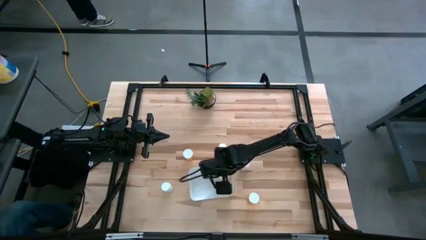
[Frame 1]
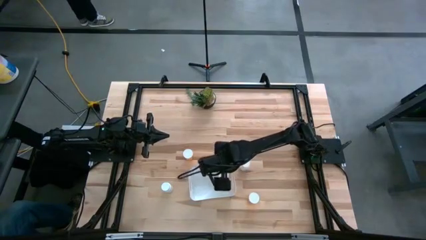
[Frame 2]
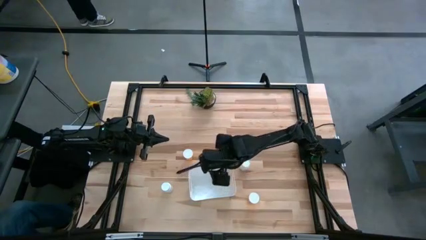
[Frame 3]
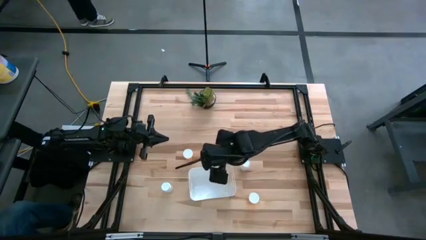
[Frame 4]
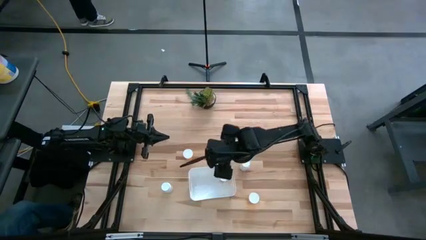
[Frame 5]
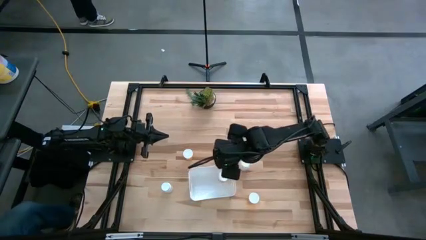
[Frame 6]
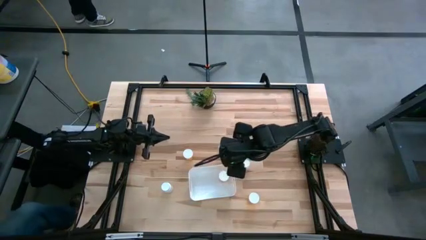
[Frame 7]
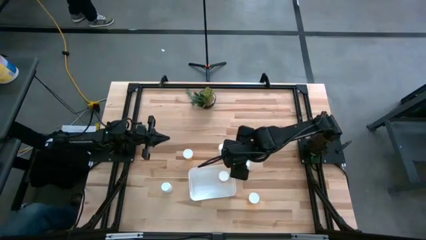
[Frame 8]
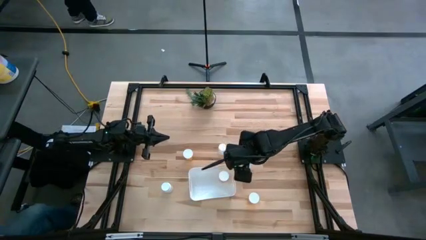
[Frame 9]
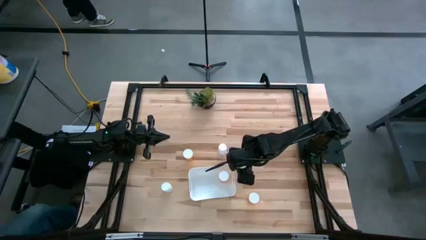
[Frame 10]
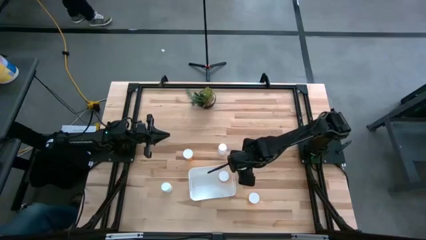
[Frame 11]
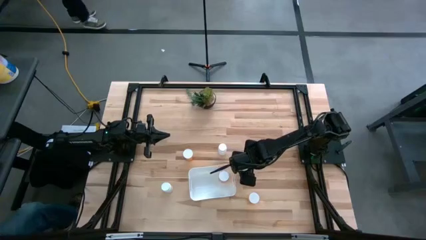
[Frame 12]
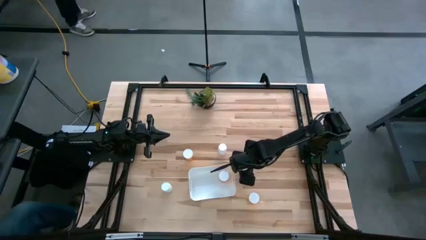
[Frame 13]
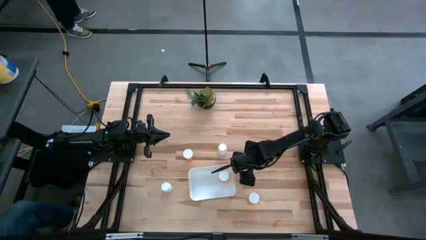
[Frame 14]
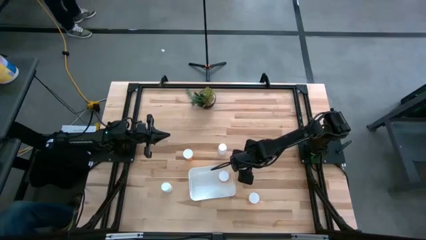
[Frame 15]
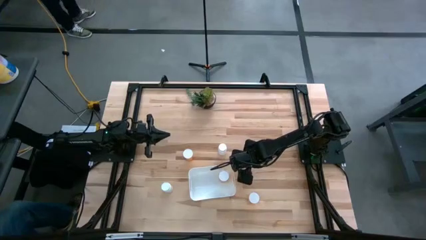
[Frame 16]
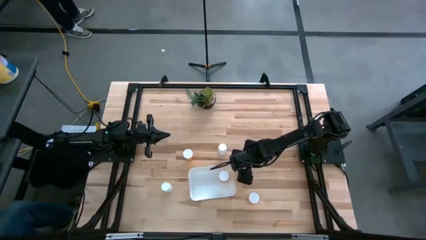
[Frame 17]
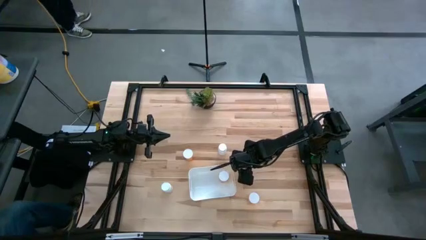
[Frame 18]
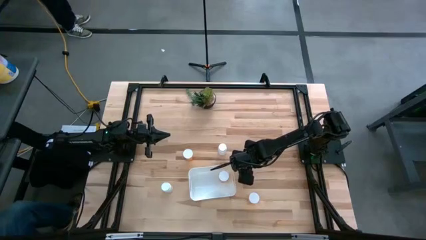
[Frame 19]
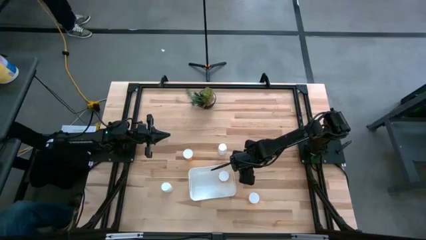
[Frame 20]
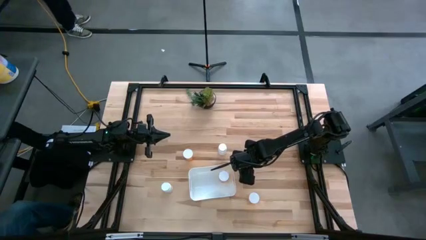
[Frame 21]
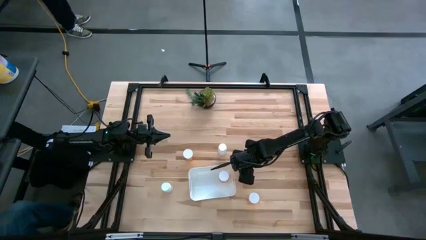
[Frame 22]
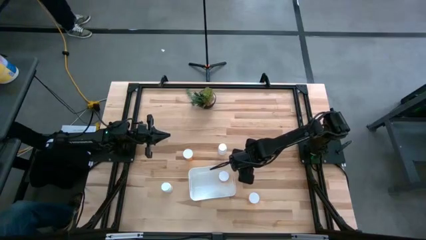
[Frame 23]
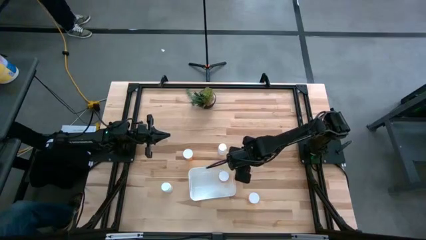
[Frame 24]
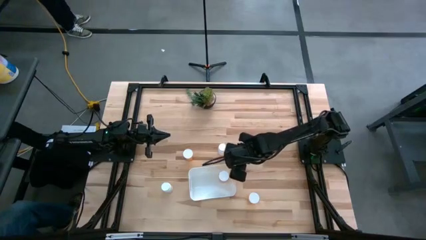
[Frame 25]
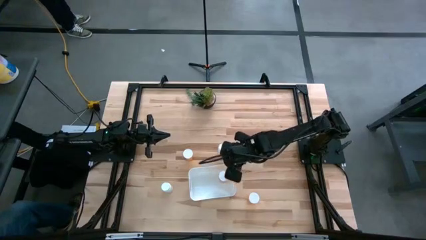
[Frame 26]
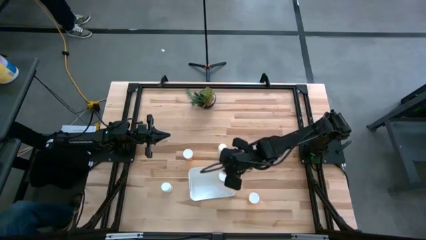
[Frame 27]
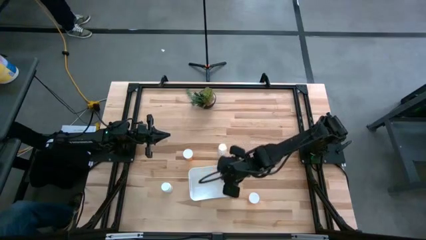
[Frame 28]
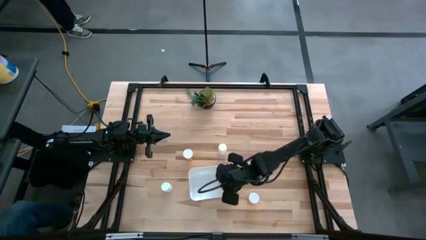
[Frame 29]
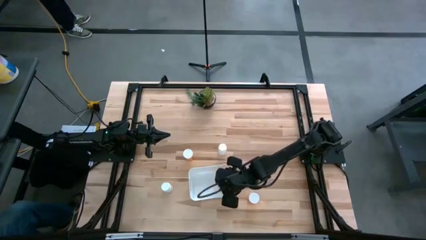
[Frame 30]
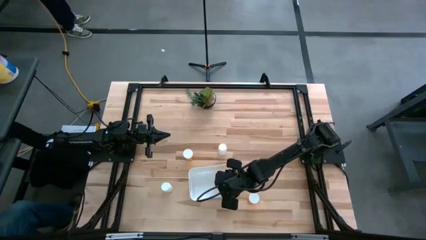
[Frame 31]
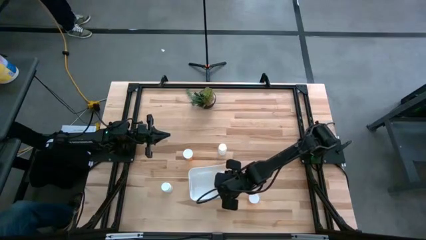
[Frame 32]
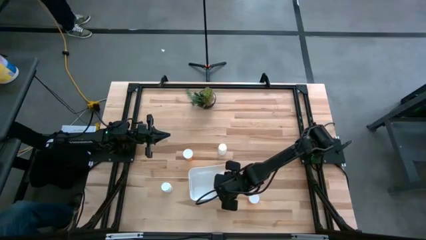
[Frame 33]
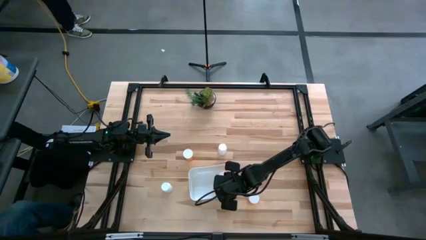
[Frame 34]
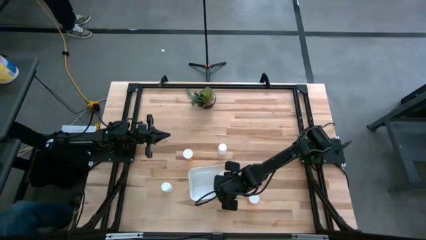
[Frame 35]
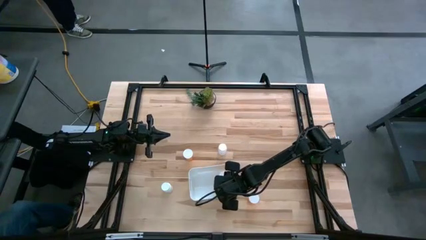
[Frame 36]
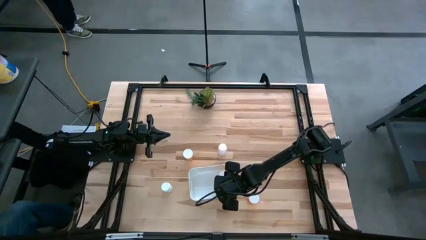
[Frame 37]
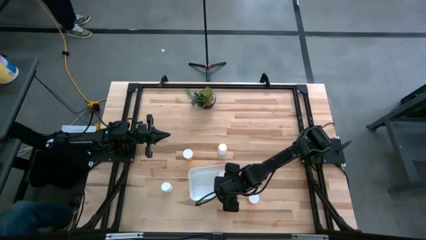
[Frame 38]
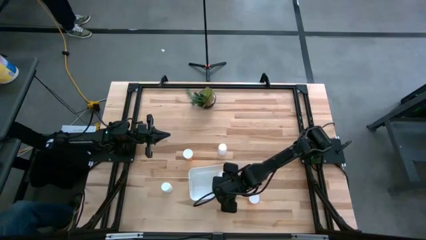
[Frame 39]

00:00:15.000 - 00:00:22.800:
Task: Pick and place pill bottles into a basket
Put the right white pill bottle into the white bin

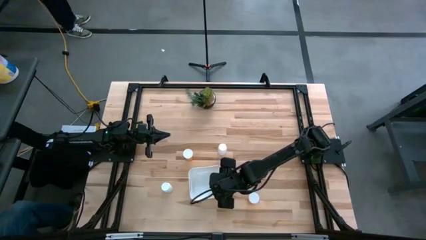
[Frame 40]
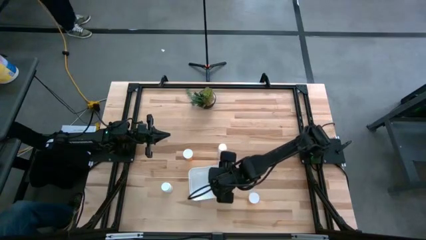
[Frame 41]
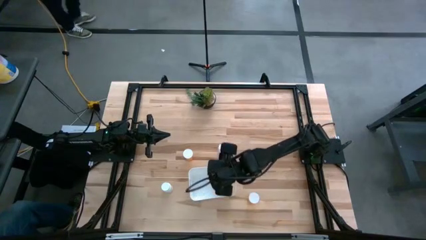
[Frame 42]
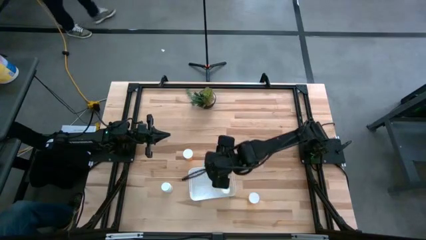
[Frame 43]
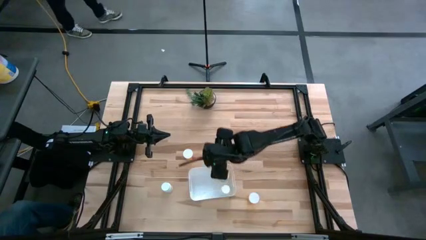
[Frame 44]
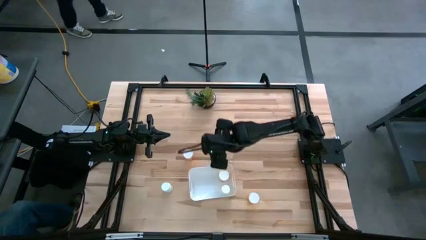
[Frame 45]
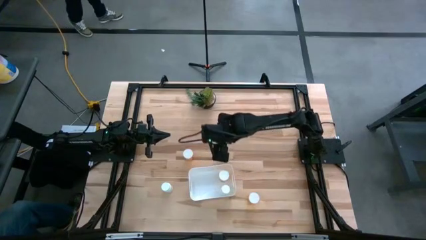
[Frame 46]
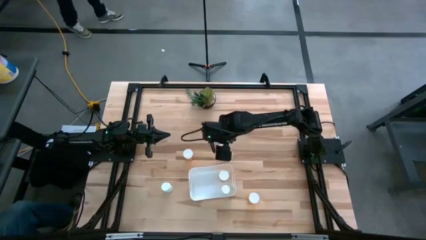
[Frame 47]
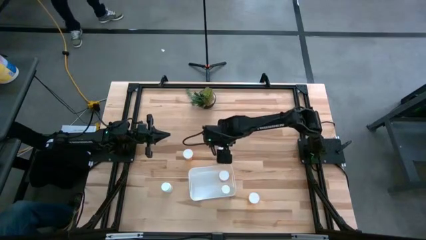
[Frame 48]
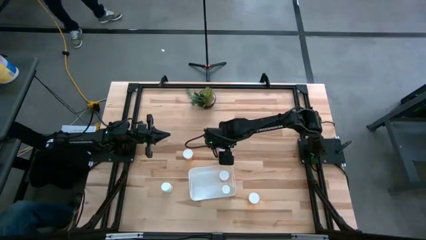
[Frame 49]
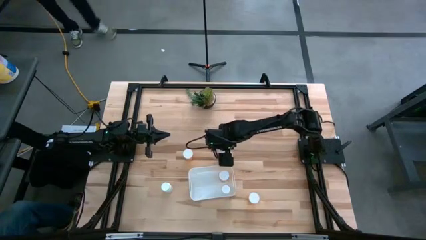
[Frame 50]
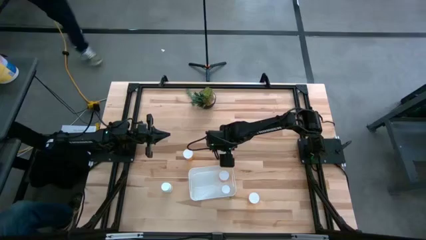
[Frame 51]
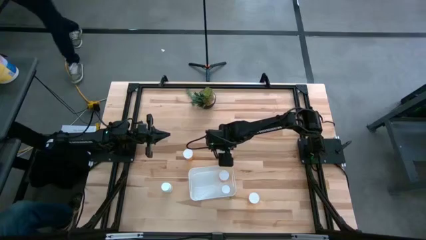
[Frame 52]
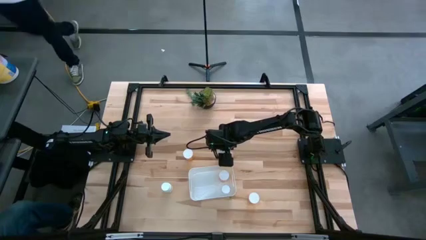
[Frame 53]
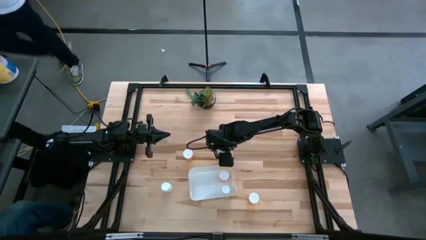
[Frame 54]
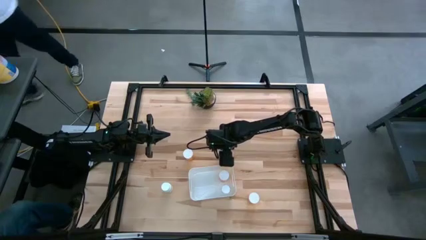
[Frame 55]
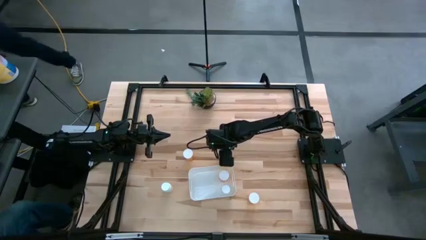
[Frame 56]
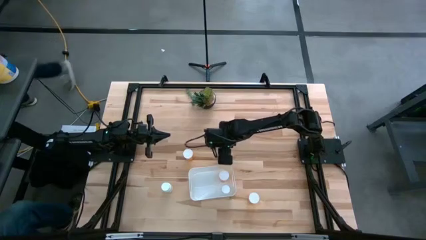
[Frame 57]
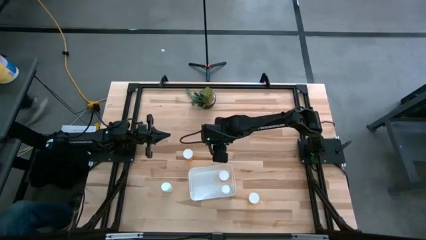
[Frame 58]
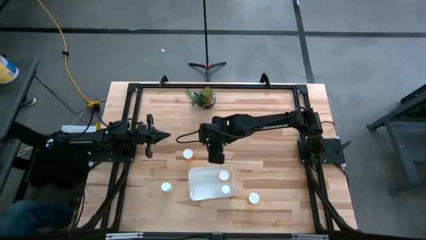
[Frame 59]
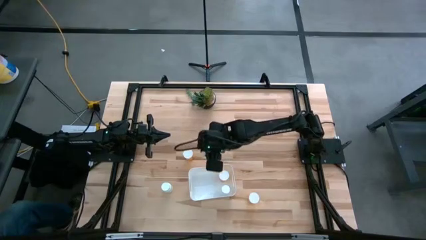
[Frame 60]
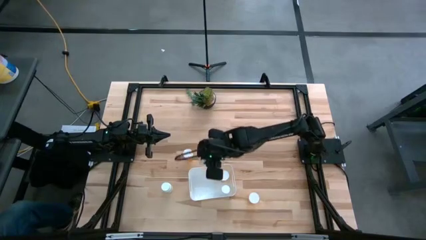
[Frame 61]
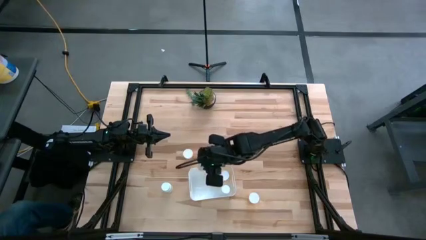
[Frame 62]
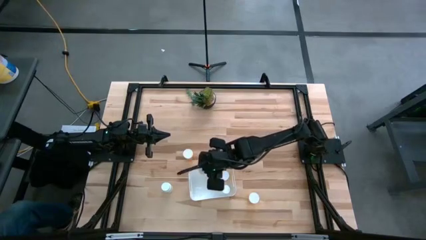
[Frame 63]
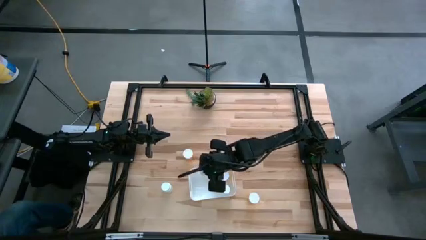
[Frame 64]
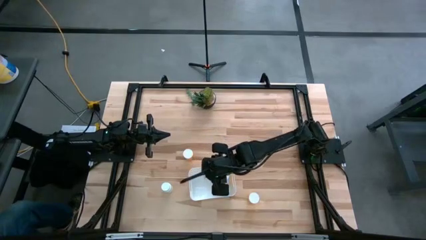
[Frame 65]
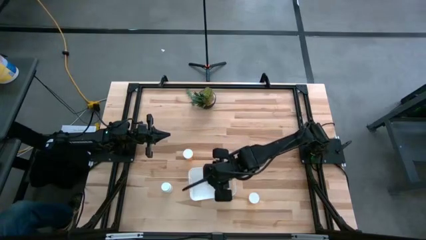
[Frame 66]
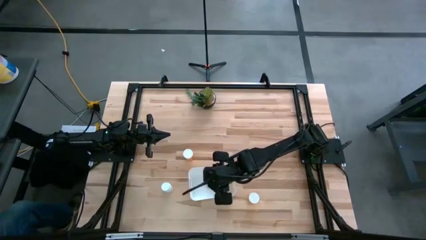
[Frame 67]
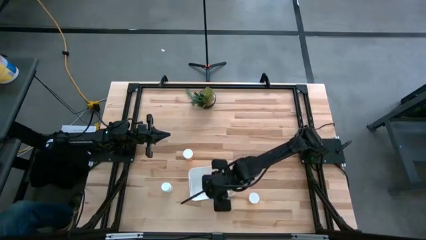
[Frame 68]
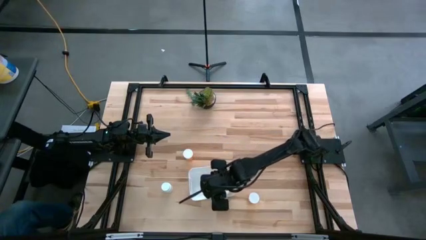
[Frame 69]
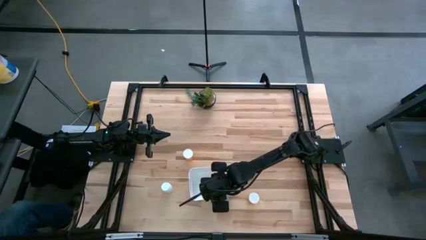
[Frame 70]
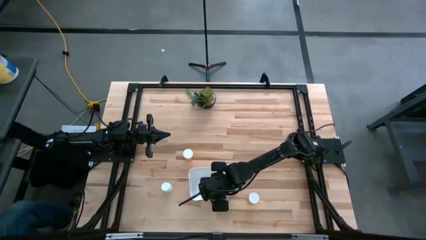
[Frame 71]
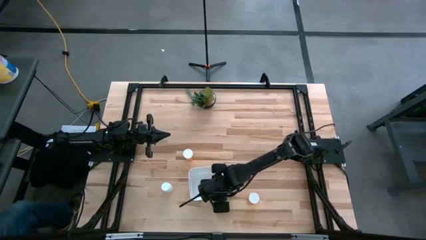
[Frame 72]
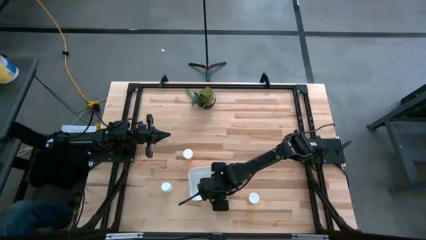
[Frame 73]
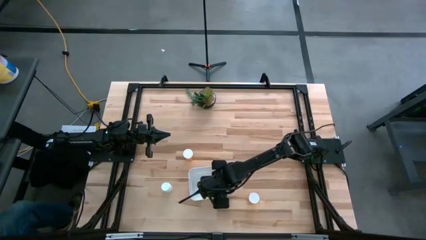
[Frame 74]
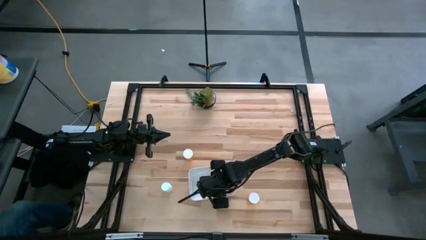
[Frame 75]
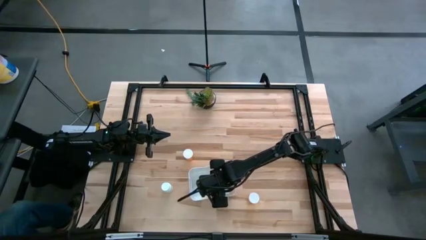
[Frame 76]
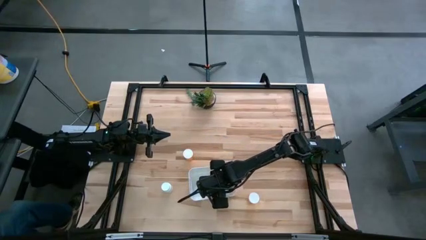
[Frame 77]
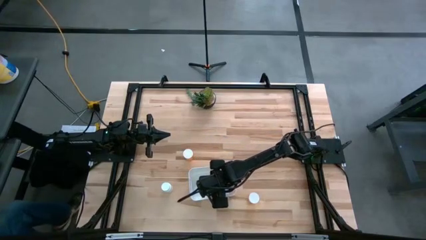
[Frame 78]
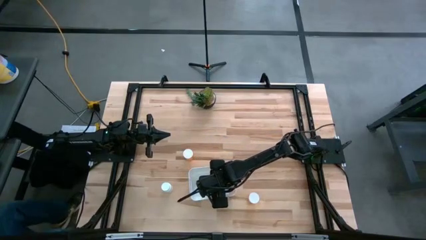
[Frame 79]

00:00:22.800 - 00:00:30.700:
Put the top white pill bottle into the white bin
